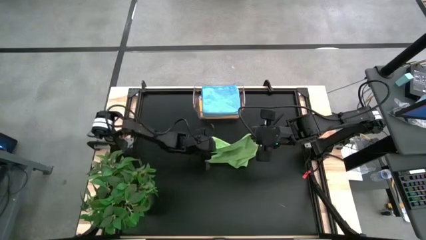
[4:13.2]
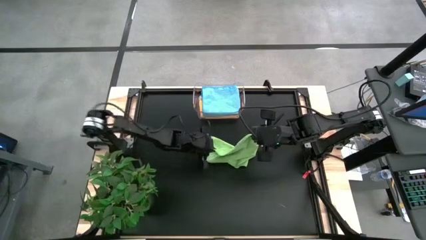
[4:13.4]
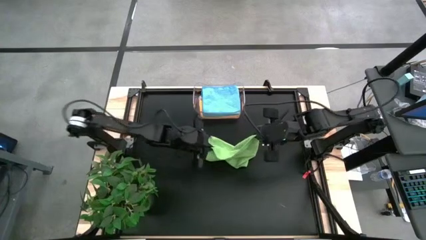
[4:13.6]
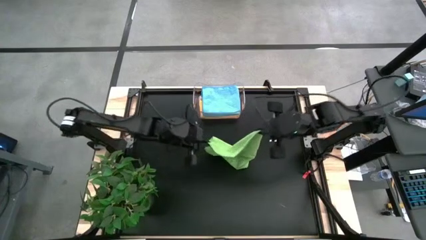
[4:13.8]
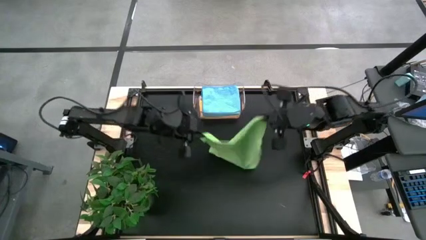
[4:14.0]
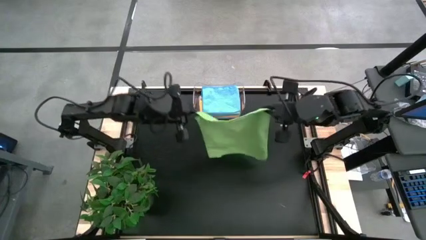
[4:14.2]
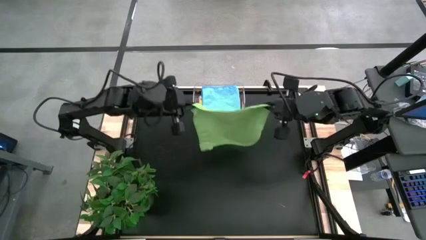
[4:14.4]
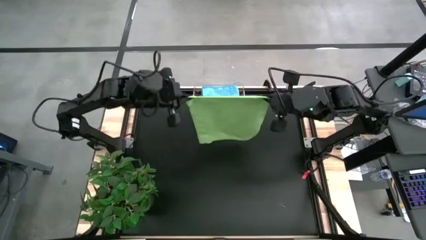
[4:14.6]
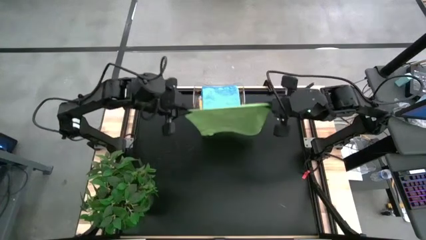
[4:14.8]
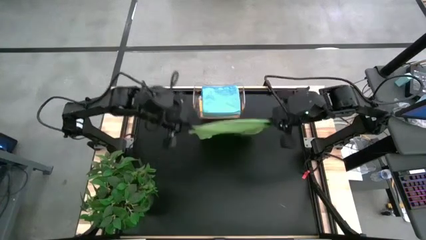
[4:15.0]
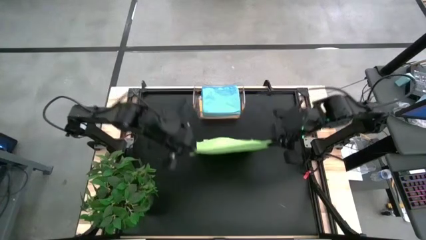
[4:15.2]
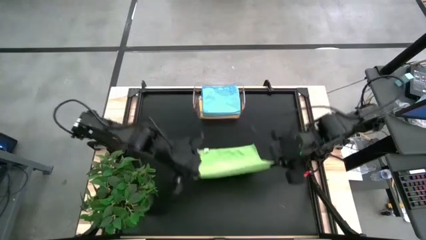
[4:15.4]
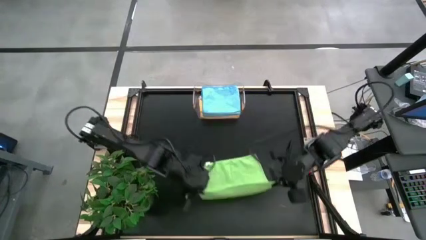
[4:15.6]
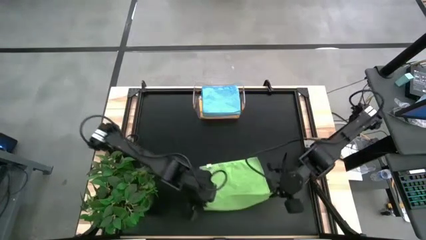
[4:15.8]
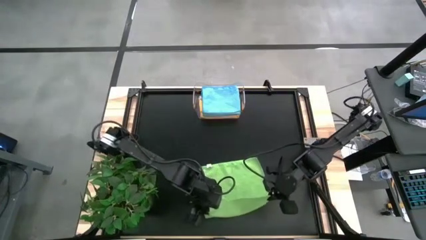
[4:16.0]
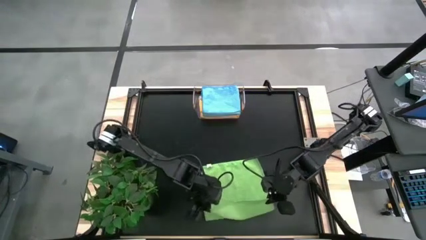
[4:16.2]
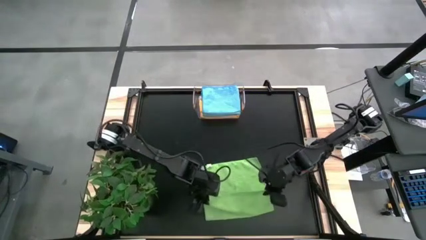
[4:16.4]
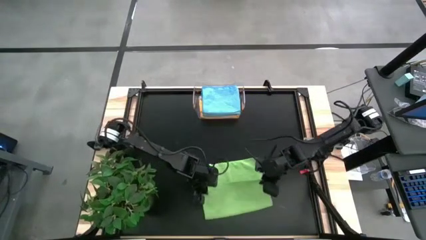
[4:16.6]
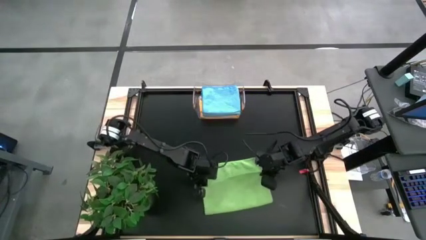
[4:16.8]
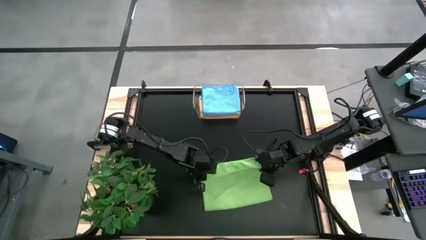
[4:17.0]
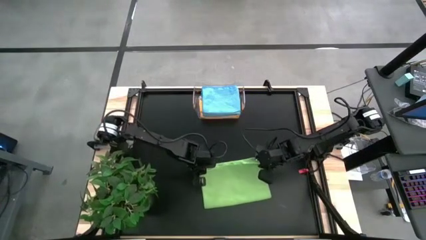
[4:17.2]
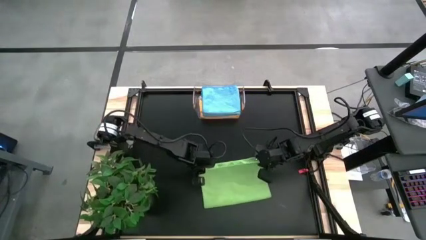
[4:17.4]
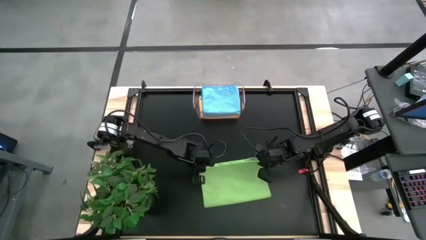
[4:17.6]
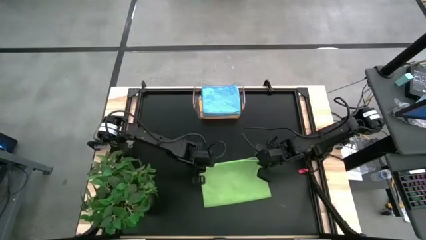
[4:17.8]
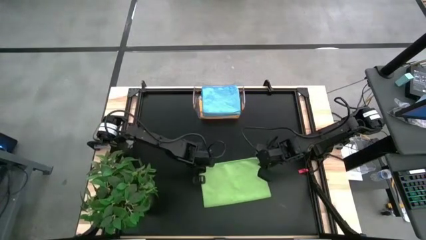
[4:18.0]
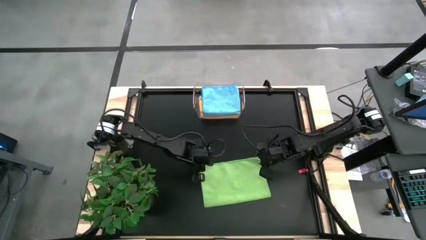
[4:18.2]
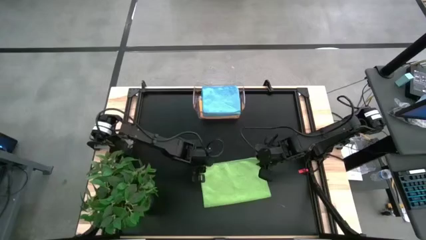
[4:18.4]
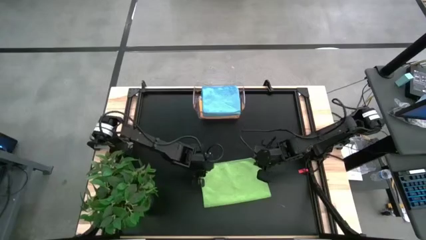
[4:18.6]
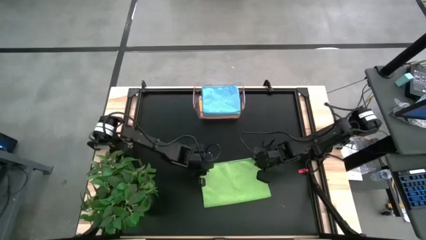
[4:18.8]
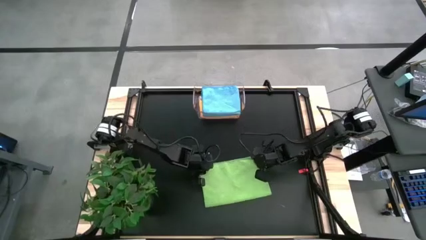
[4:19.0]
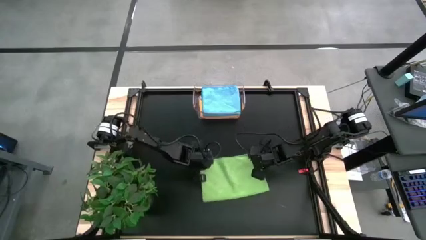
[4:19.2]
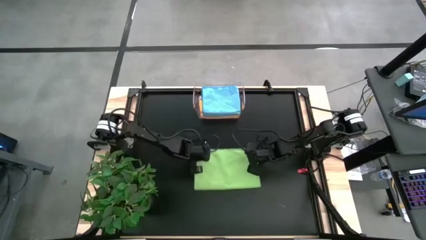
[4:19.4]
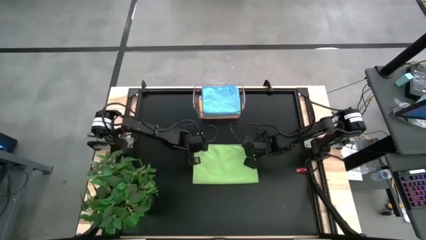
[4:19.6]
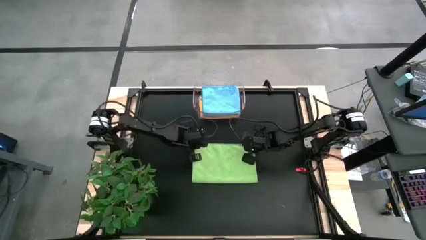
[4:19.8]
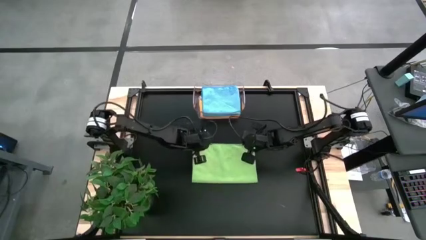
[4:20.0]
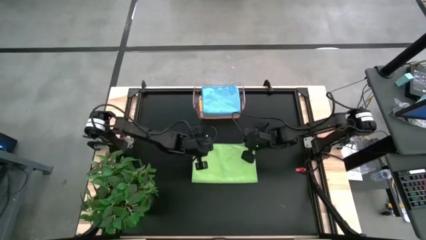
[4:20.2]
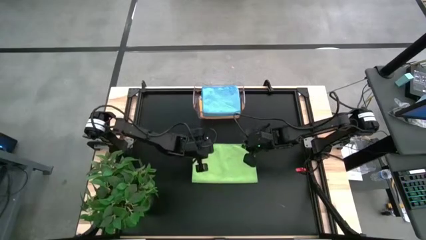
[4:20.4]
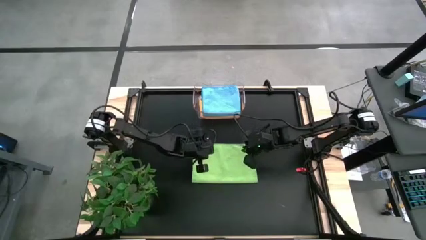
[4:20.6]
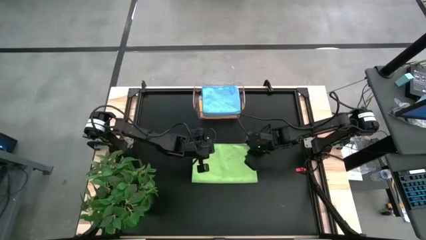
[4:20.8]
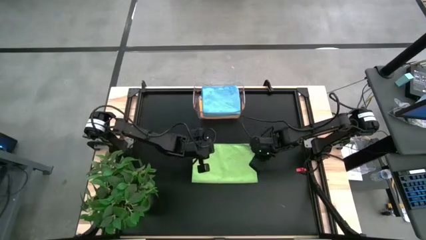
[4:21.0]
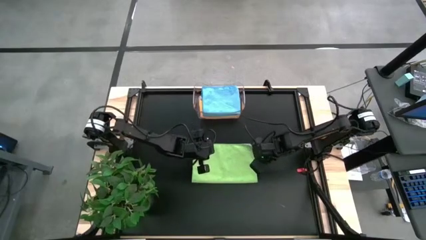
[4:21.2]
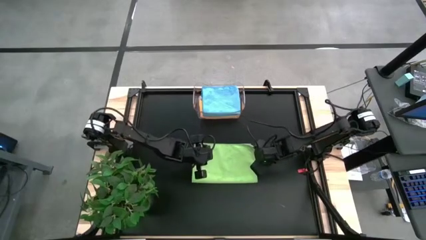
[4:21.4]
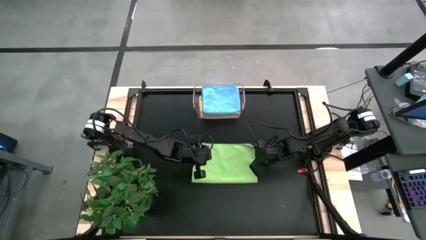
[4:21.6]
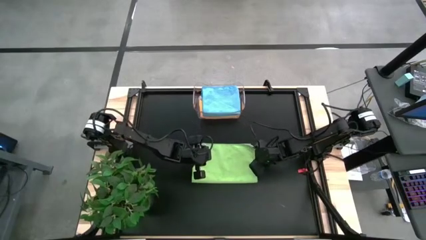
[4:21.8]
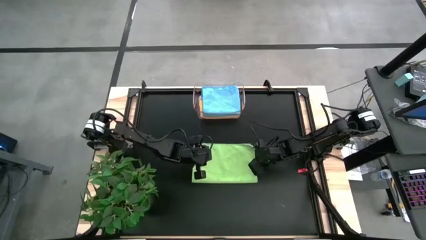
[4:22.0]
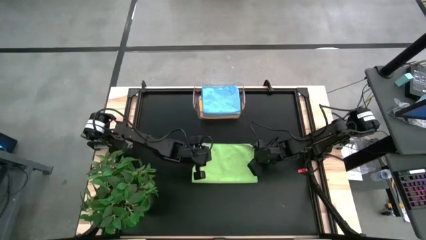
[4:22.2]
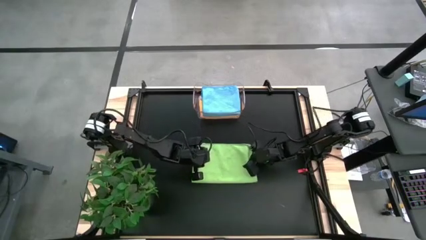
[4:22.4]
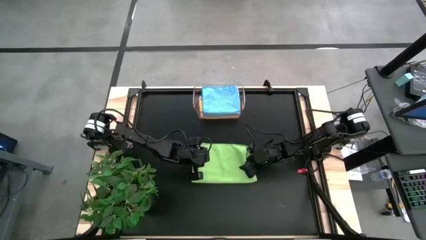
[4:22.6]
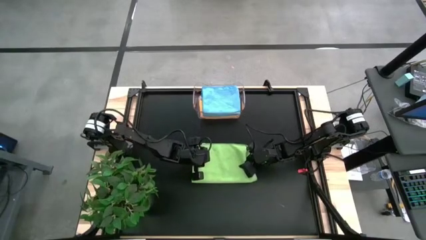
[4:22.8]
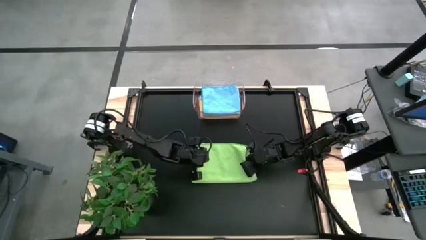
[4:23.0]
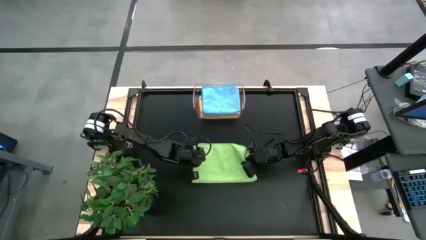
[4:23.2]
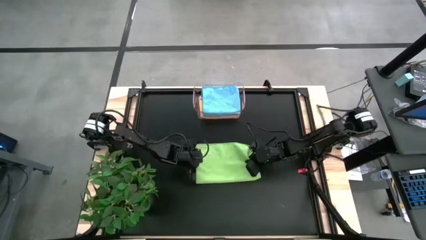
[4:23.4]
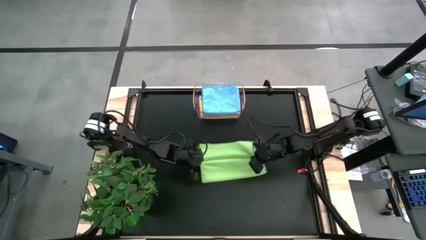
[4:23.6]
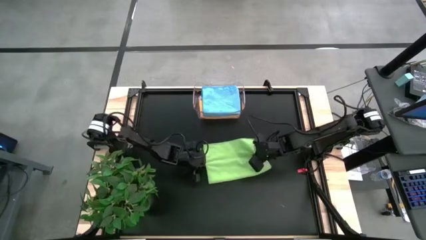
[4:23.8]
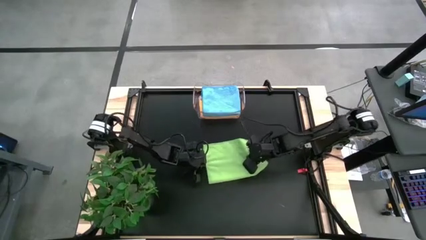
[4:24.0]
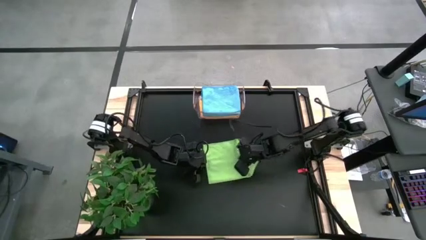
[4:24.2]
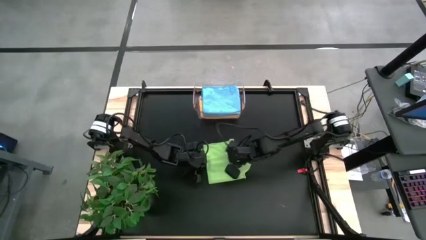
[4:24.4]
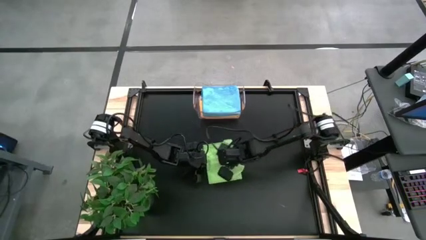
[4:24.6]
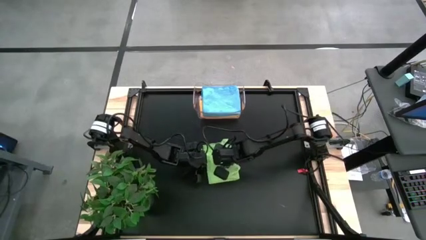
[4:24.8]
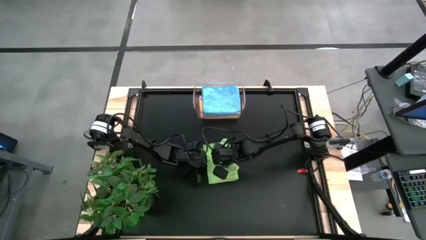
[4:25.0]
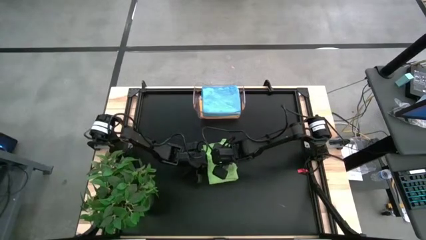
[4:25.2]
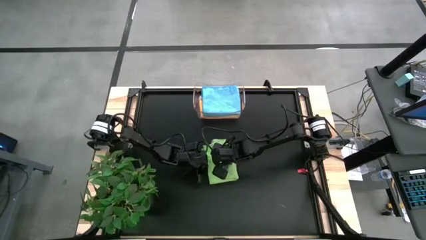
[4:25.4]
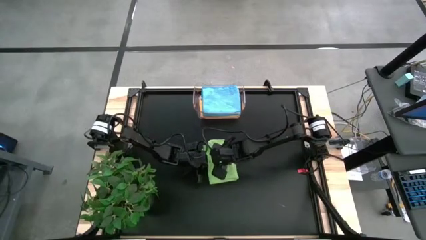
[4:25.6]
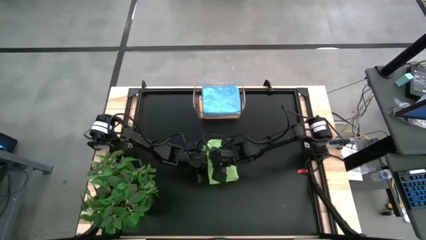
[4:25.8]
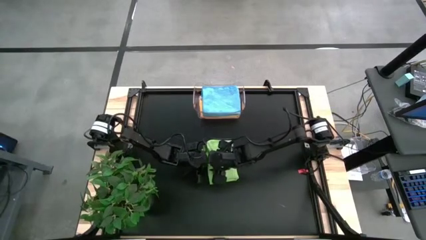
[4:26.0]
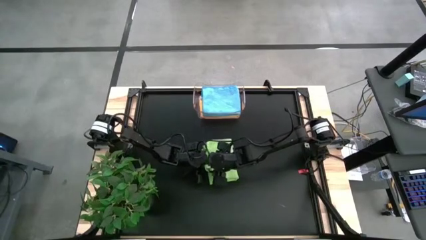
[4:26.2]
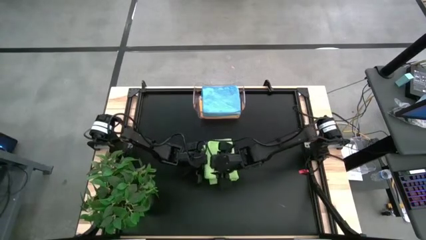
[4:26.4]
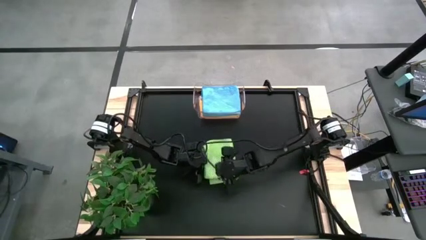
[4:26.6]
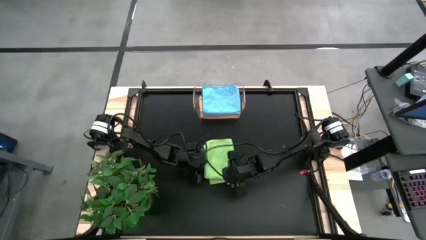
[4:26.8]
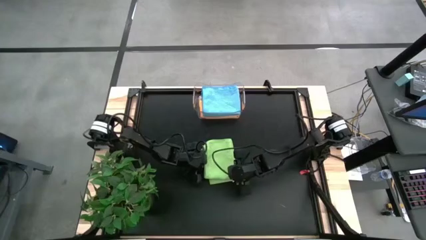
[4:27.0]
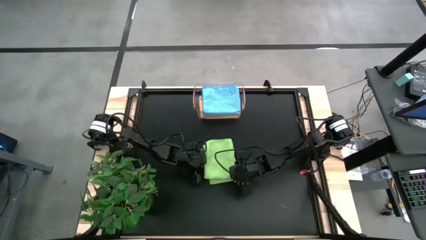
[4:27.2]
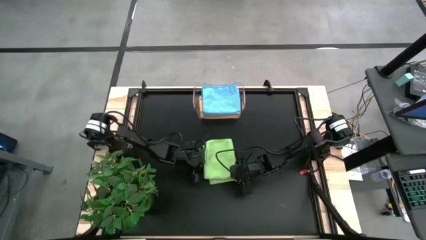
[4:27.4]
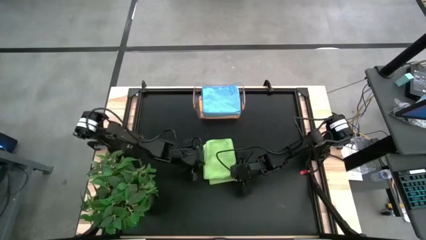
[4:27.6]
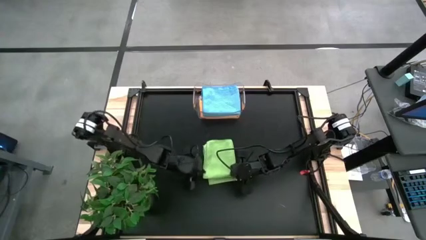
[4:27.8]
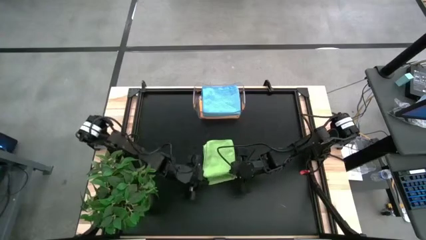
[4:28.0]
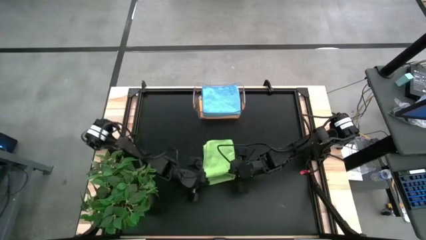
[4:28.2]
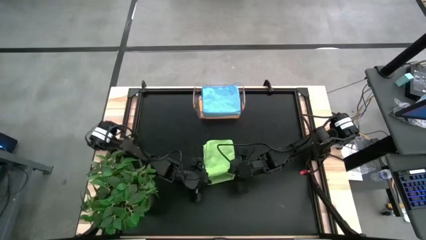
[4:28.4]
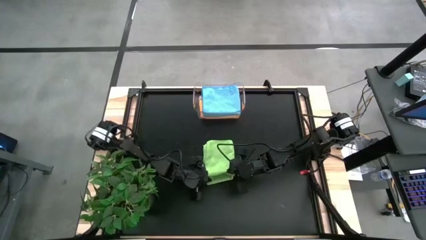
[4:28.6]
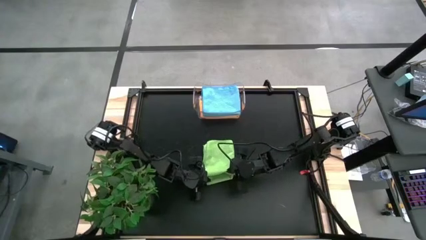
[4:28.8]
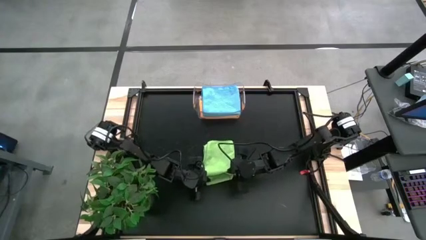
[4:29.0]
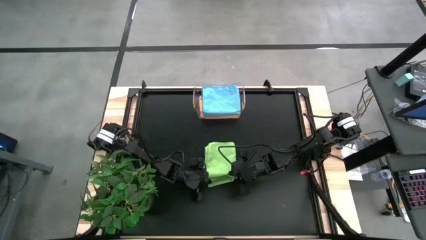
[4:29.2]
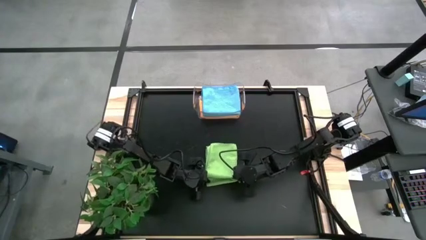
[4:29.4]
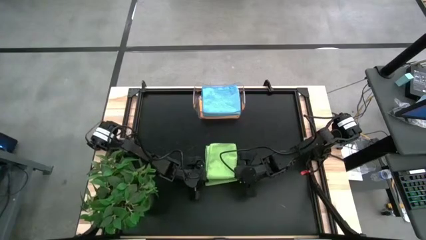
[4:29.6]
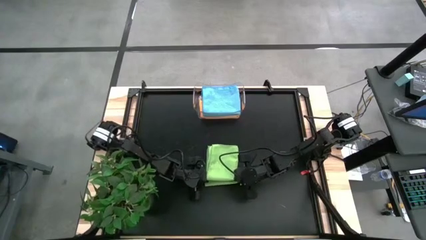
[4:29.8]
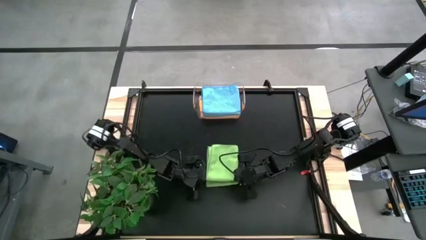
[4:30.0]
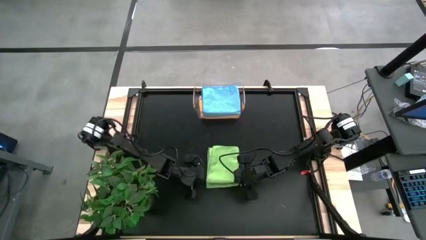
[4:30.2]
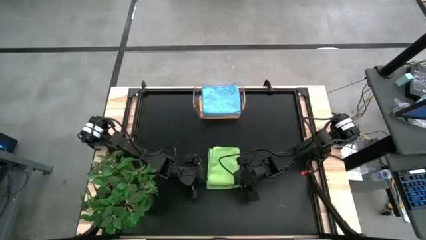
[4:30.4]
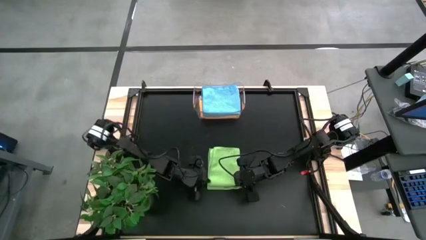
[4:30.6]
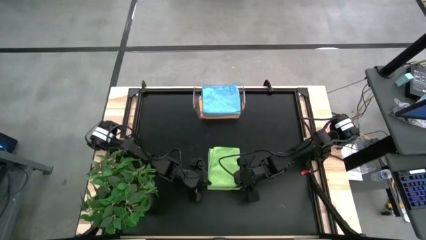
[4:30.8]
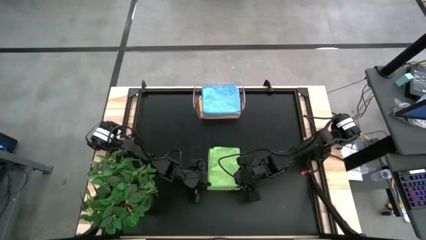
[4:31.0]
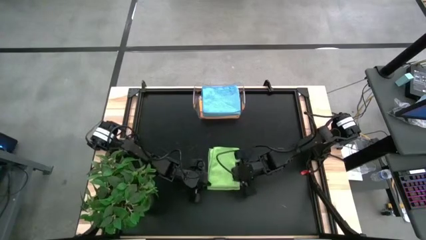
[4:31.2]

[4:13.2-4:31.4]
Task: Fold microfiber towels
Fold the green microfiber cloth
